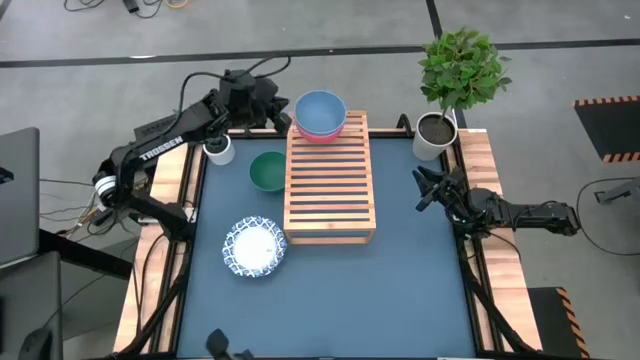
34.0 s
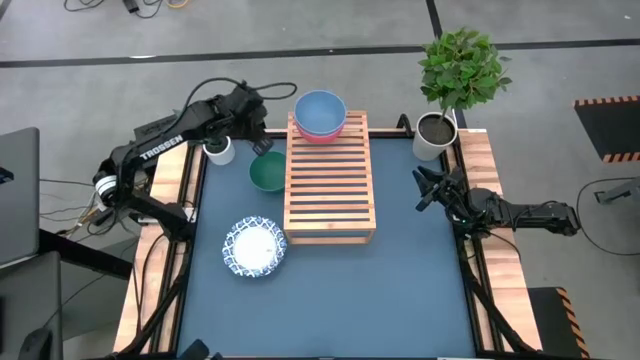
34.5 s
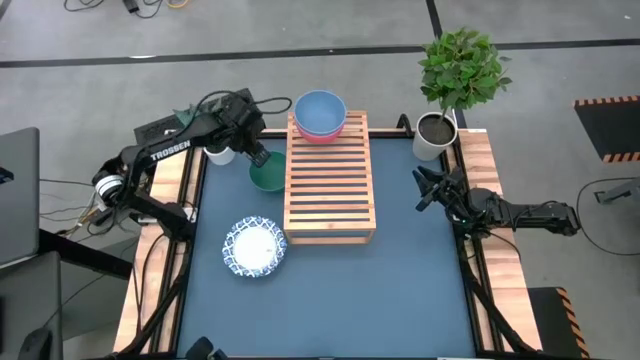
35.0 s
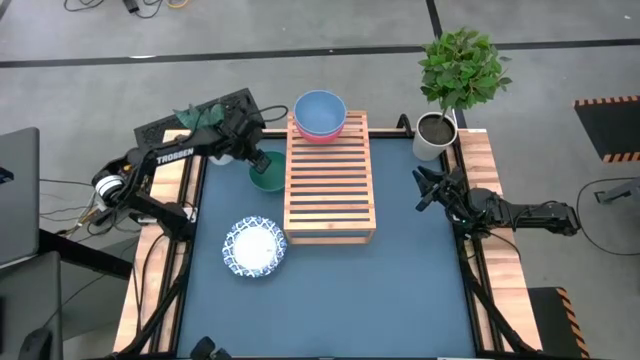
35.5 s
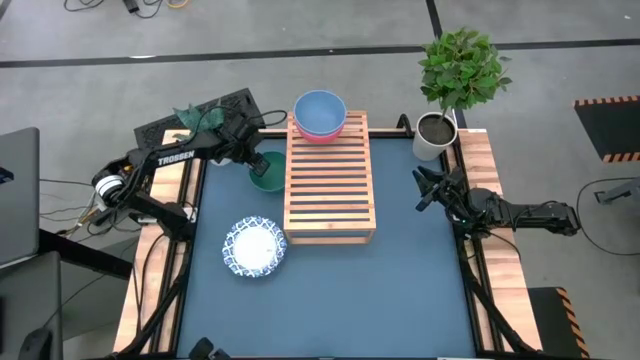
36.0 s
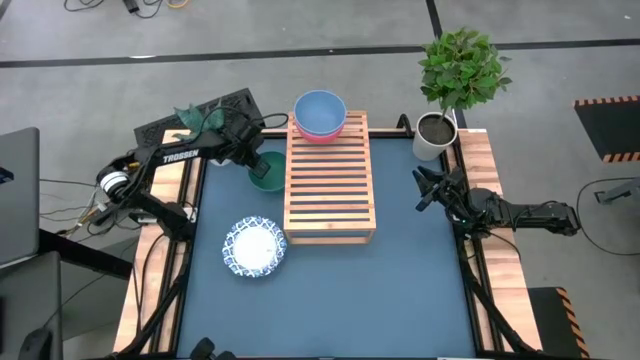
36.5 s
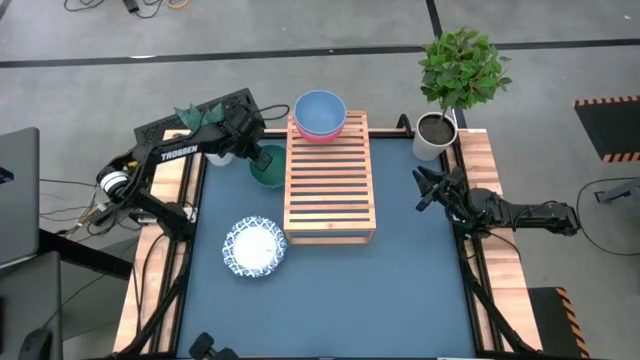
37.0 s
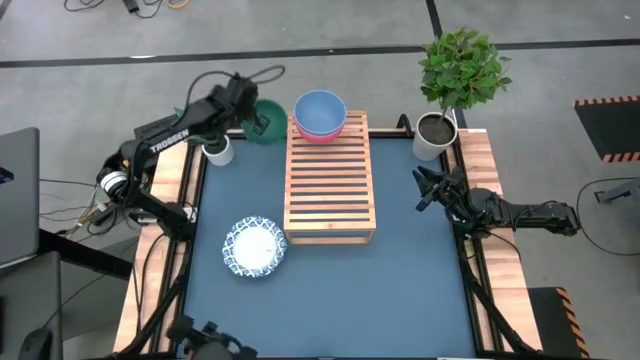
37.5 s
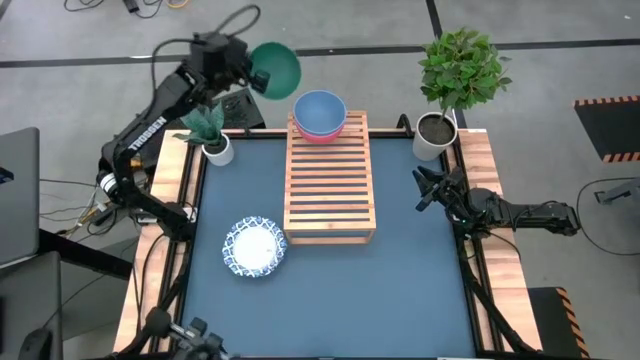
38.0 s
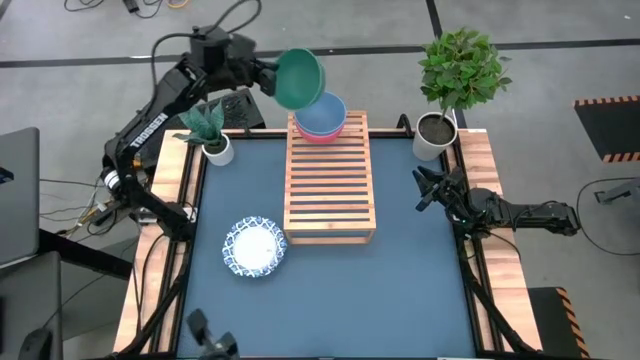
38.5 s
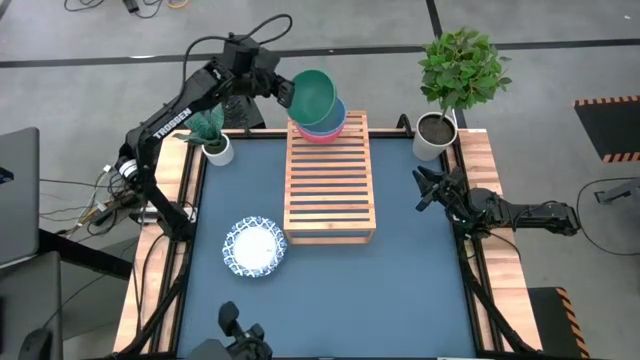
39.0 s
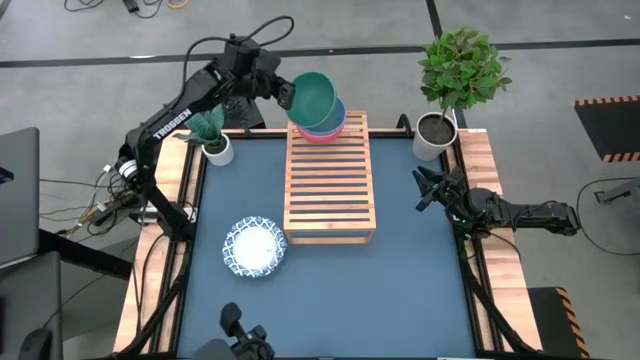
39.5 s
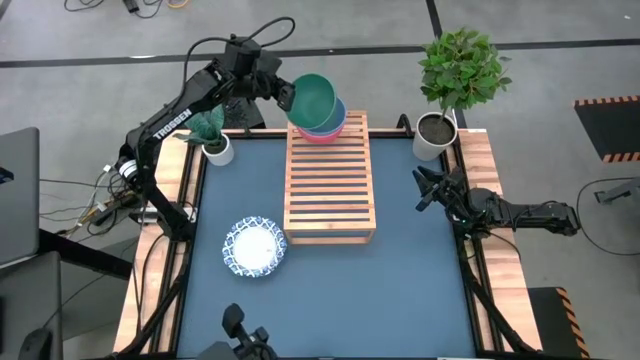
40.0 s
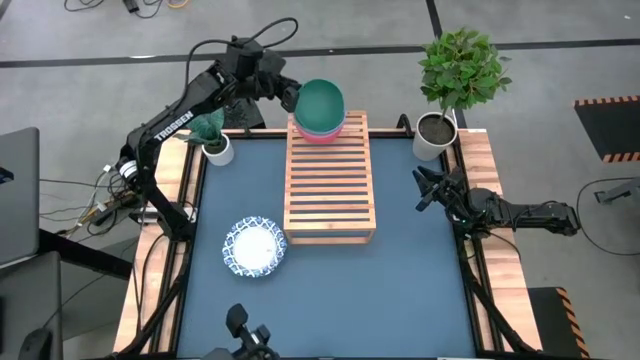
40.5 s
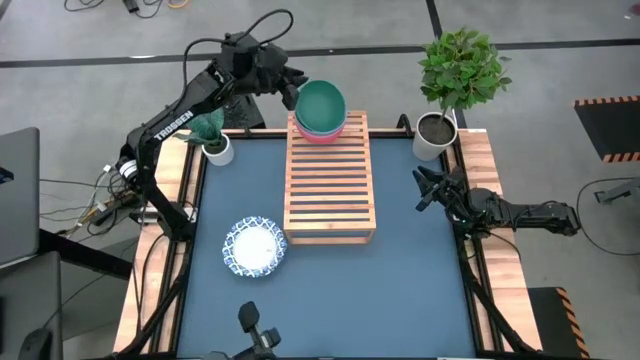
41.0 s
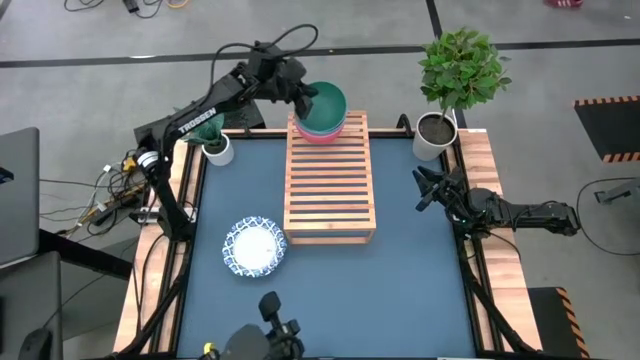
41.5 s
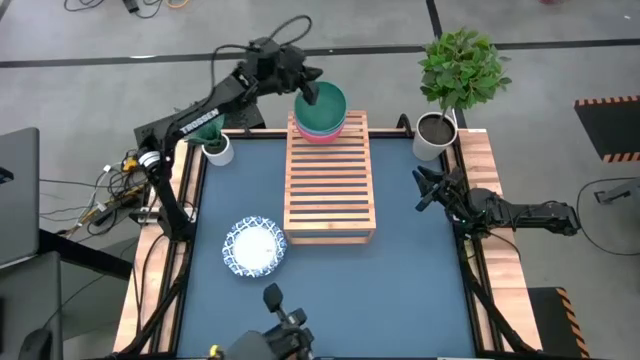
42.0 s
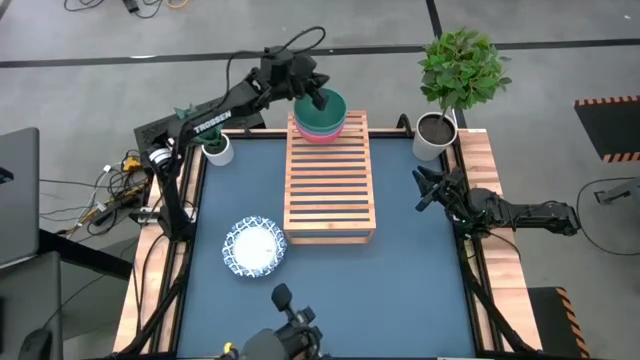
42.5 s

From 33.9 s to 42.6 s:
Task: Place and stack bowls onto a shelf
Stack the green bowl on the the blue bowl

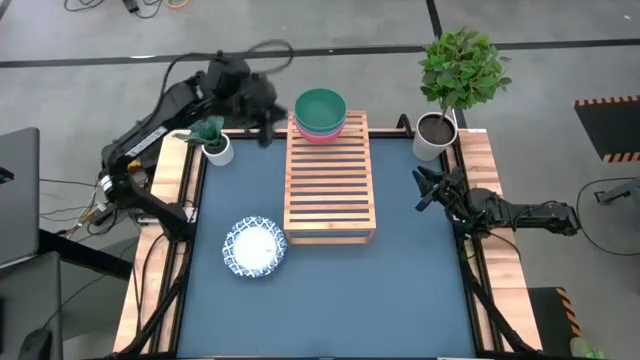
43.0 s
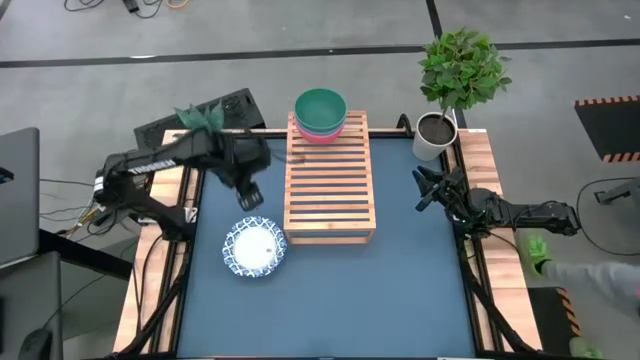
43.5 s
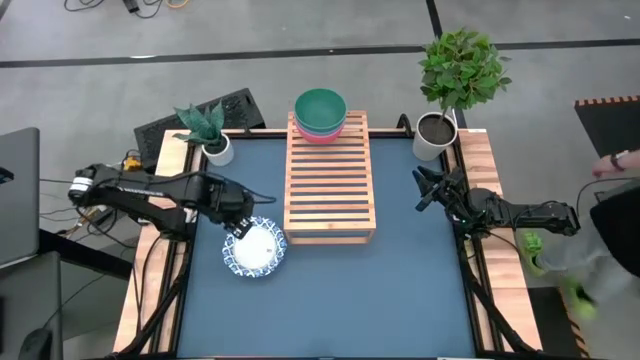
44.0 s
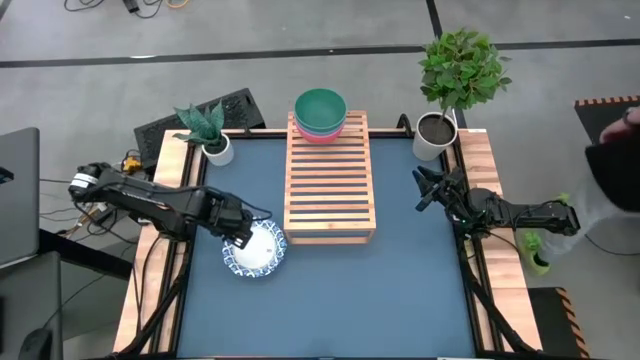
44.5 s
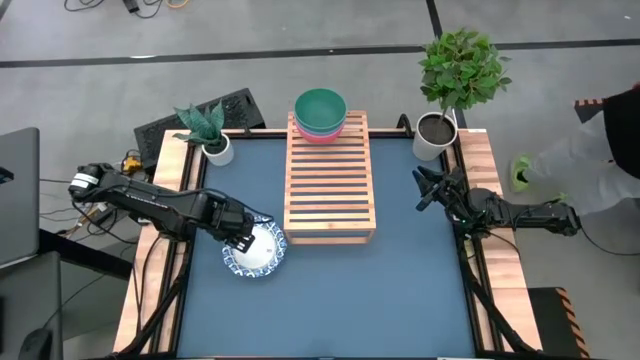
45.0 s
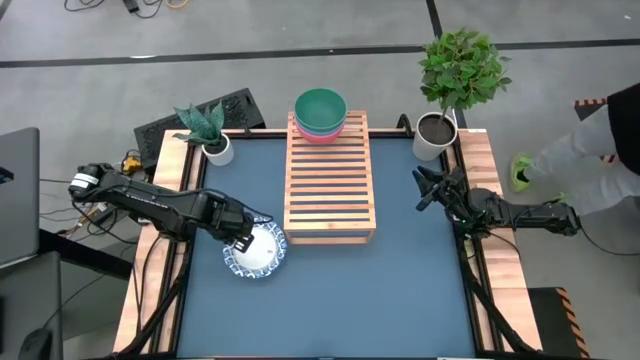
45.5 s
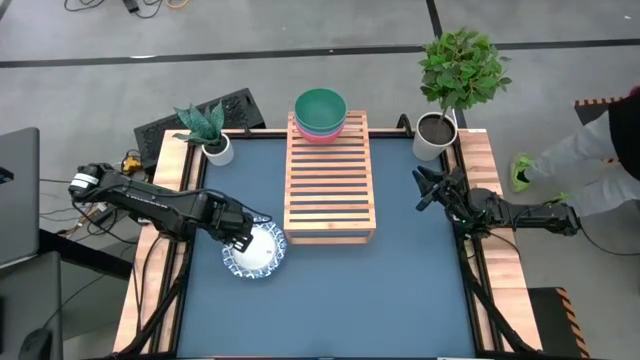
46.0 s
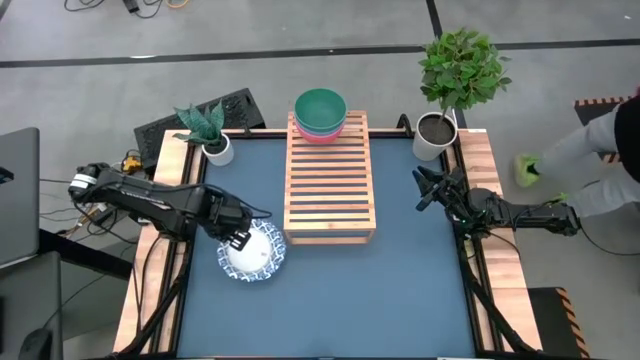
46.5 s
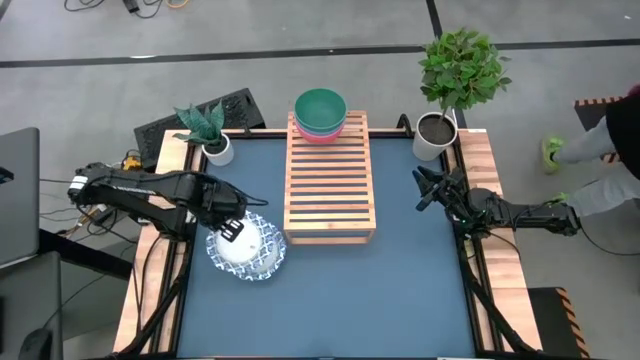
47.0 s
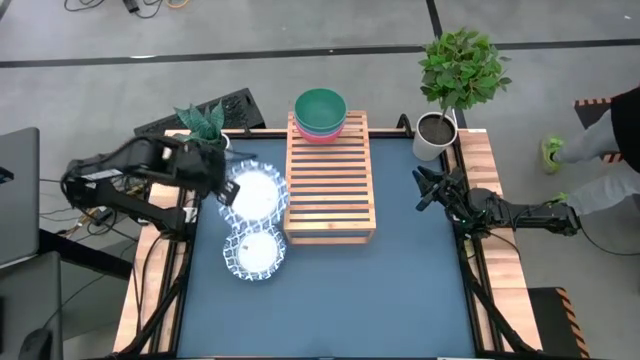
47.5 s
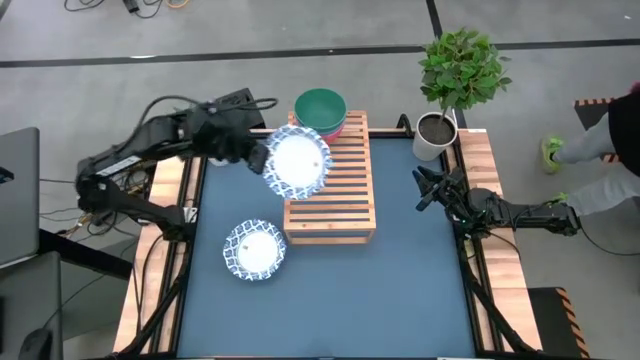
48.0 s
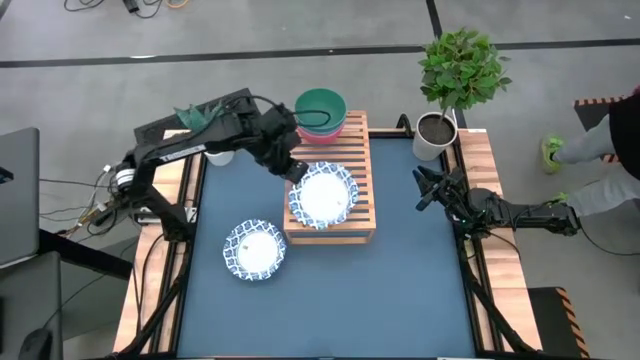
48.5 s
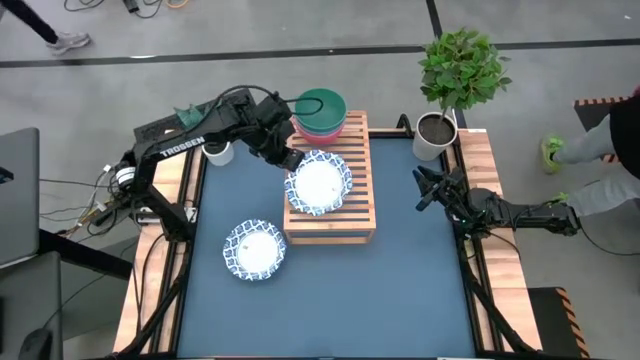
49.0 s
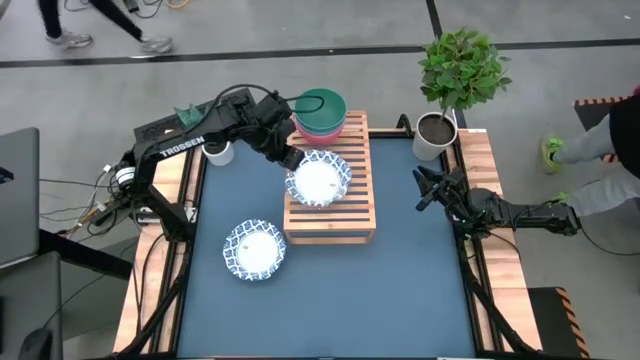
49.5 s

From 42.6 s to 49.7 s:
Put the white patterned bowl on the shelf

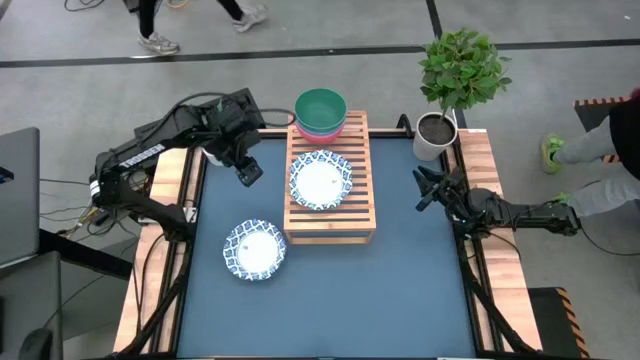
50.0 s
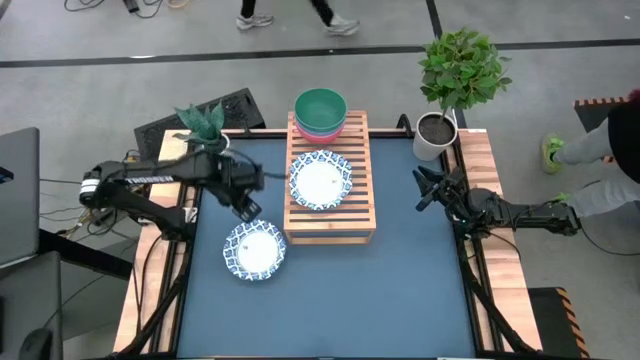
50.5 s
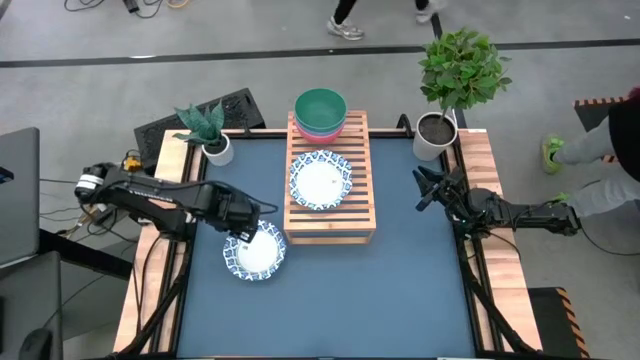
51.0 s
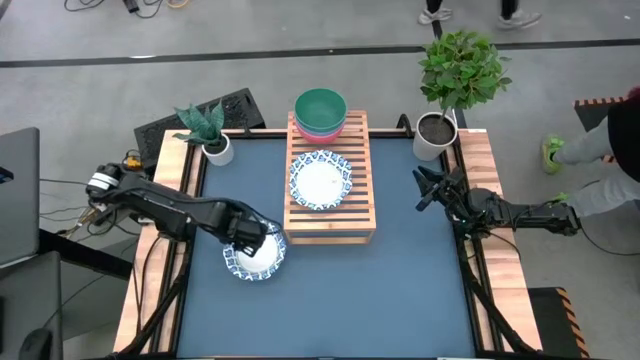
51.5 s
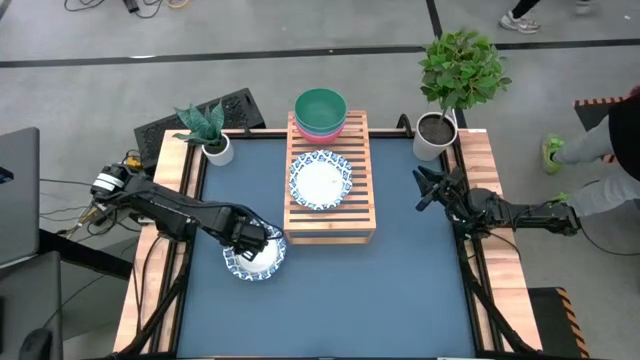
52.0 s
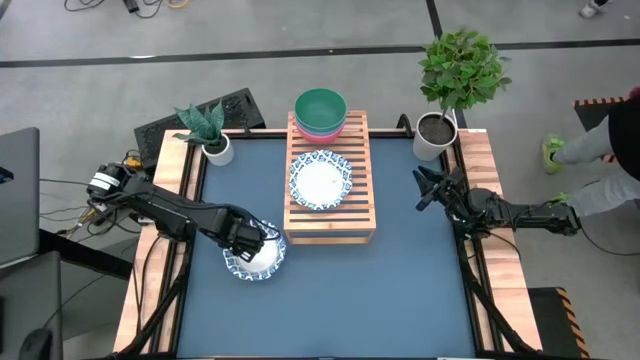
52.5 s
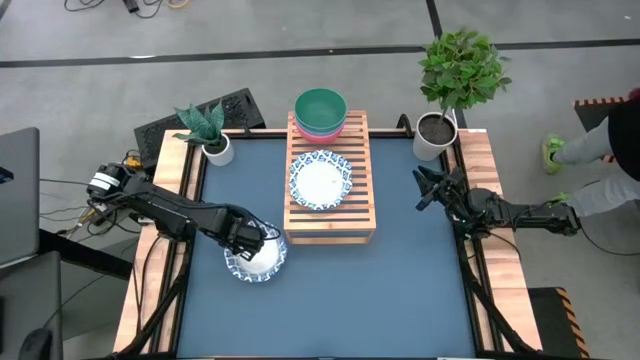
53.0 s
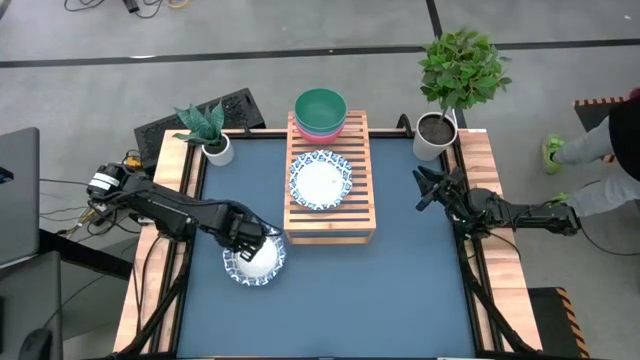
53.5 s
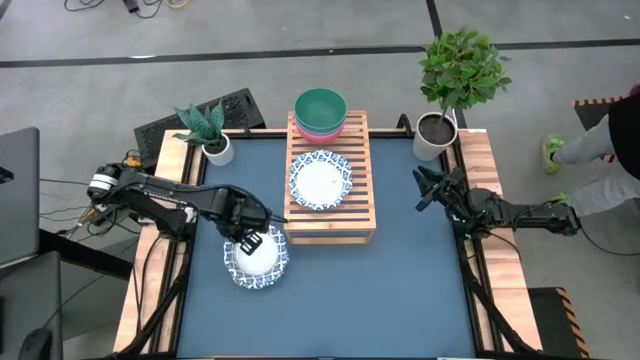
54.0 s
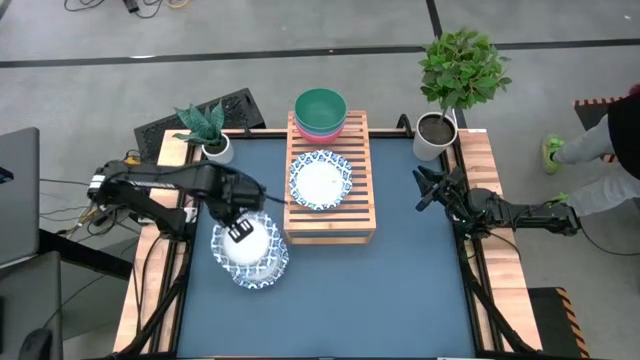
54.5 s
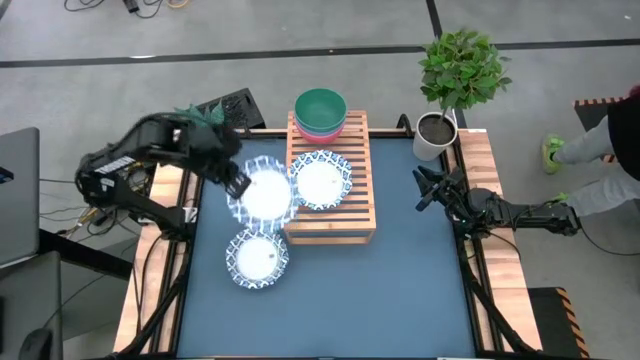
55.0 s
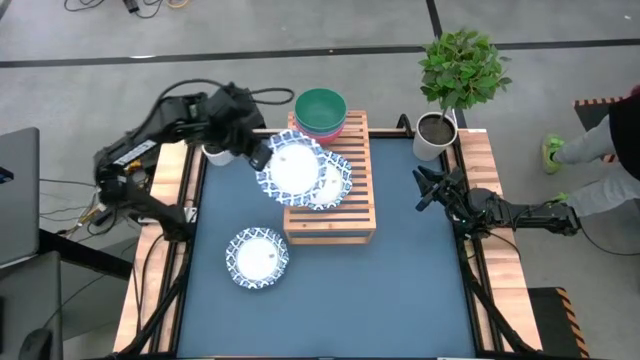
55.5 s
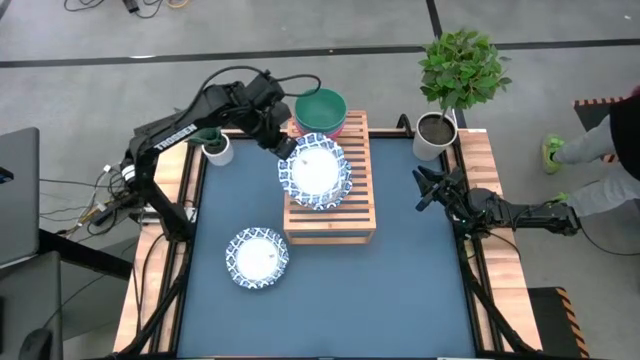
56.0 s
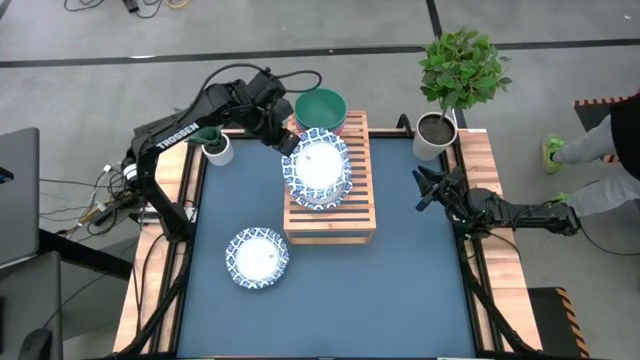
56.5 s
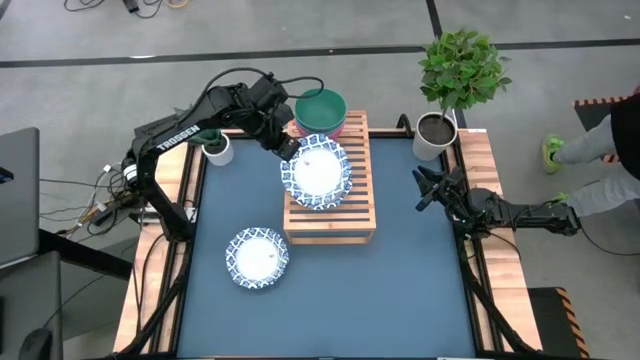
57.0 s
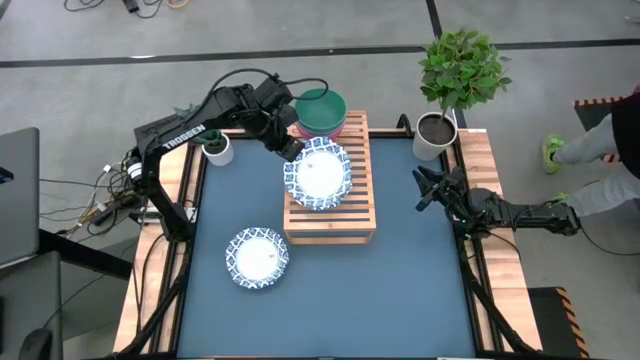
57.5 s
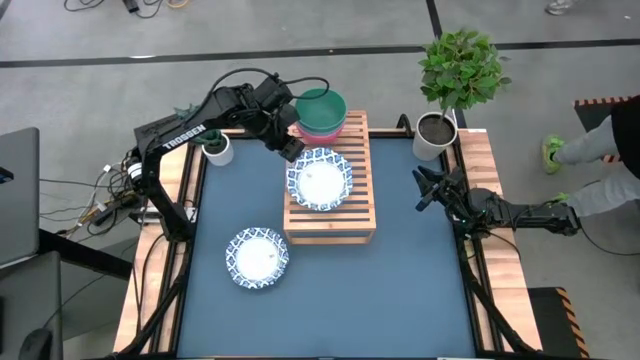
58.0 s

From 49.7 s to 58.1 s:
Stack the white patterned bowl on the white patterned bowl
